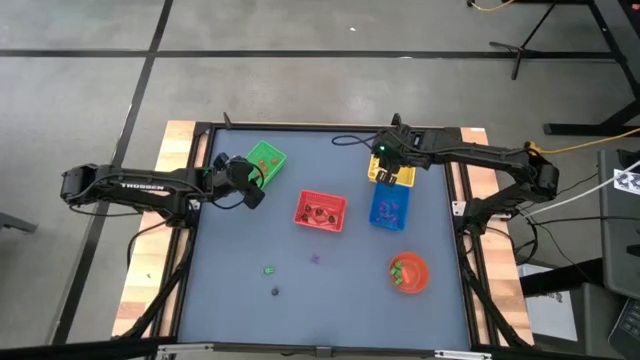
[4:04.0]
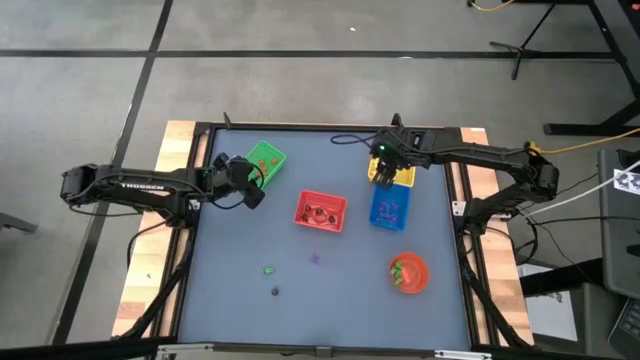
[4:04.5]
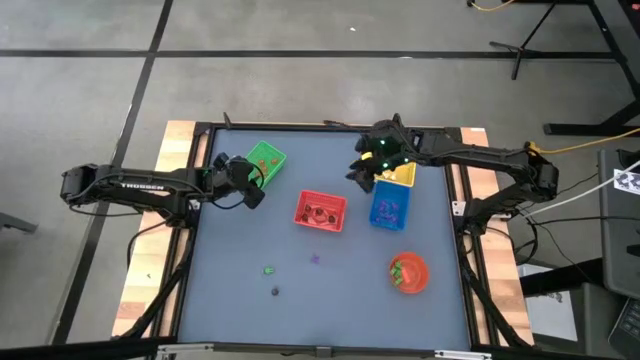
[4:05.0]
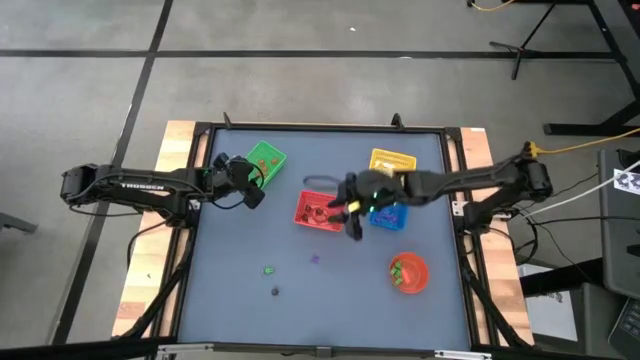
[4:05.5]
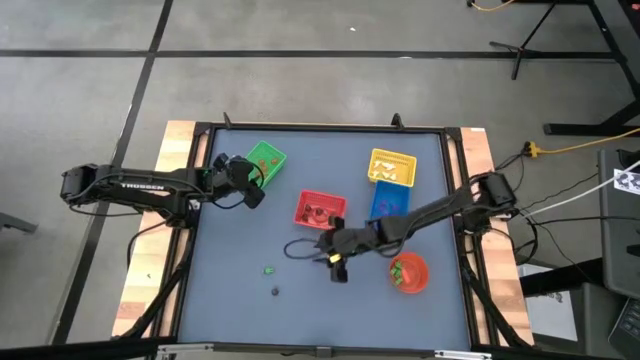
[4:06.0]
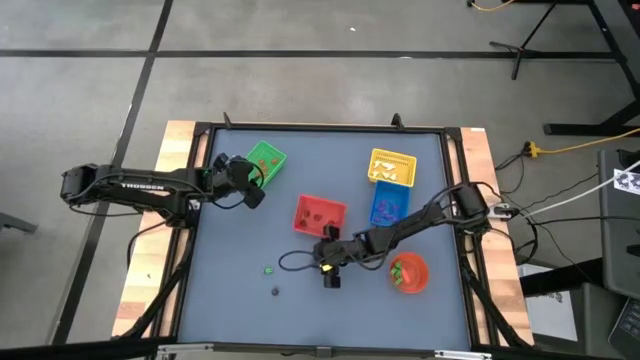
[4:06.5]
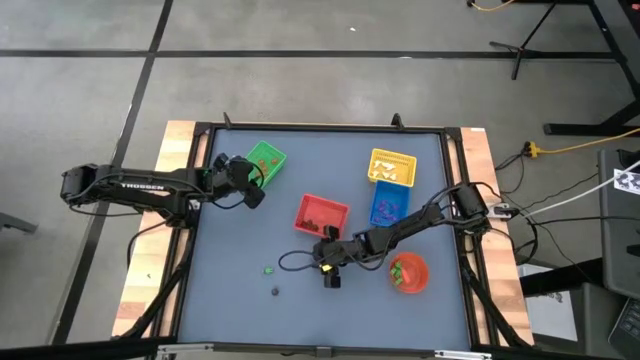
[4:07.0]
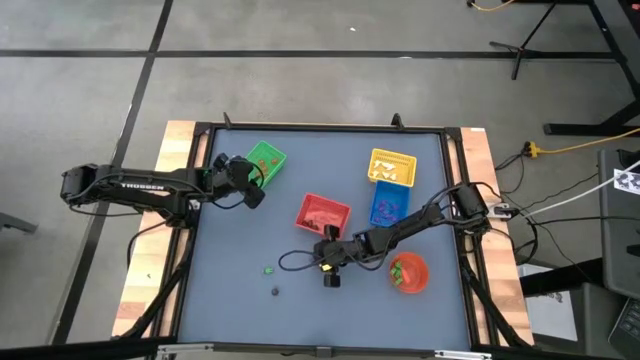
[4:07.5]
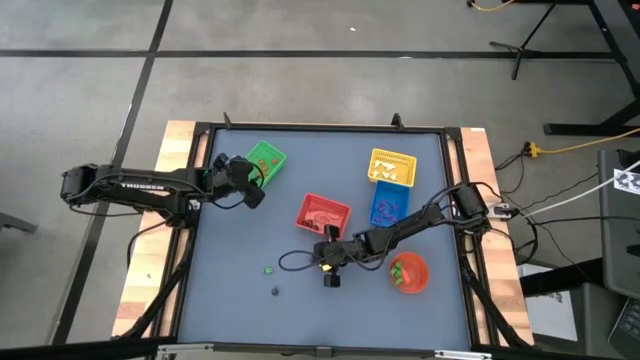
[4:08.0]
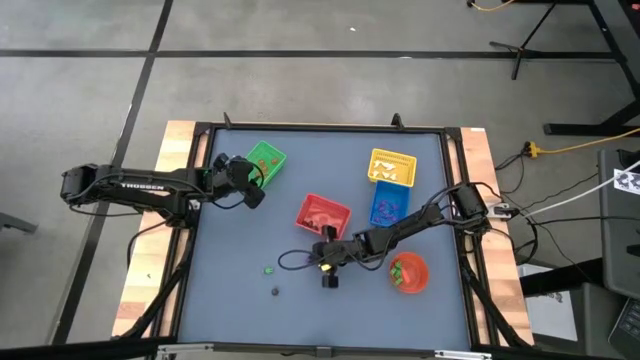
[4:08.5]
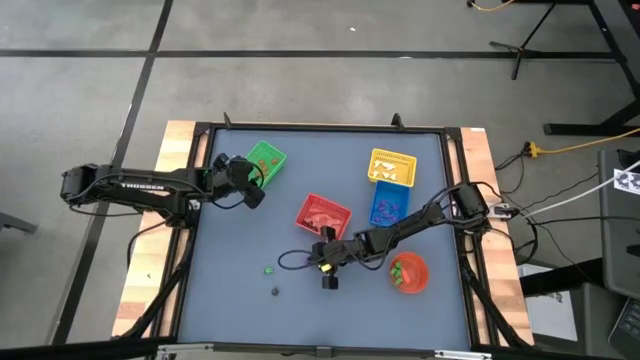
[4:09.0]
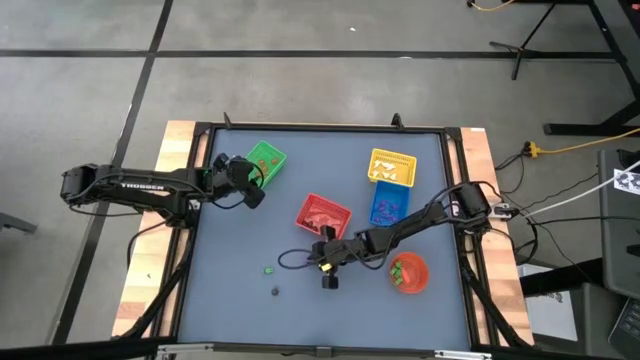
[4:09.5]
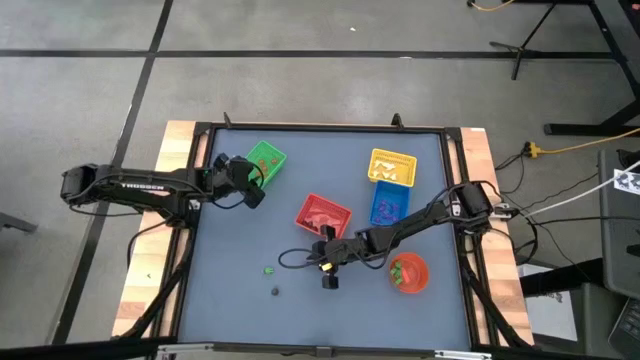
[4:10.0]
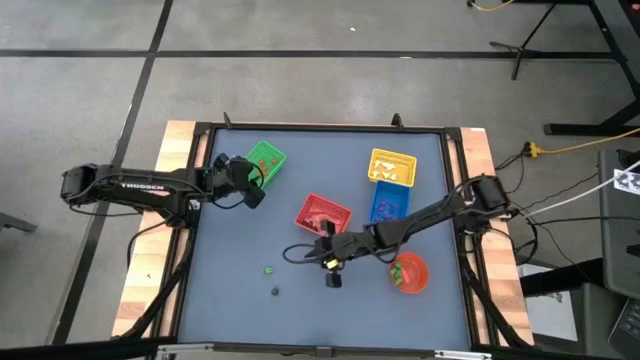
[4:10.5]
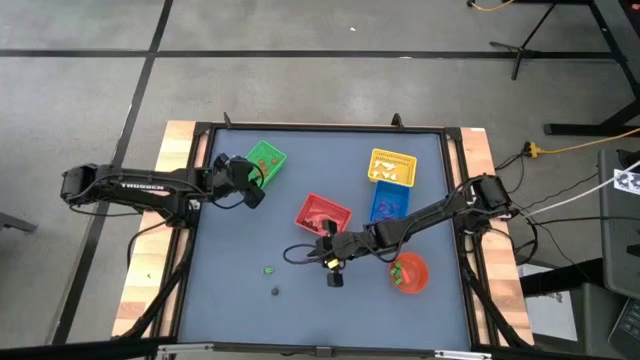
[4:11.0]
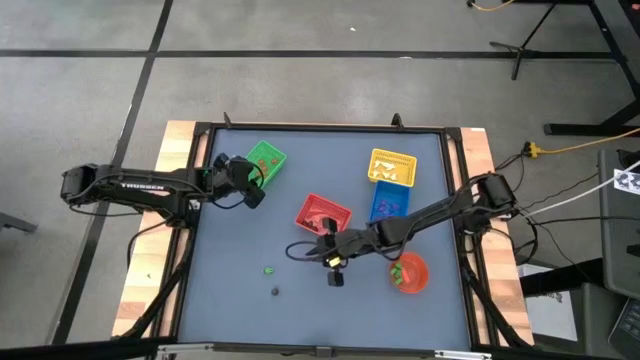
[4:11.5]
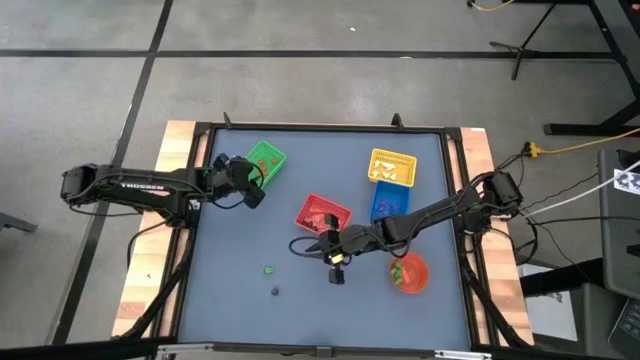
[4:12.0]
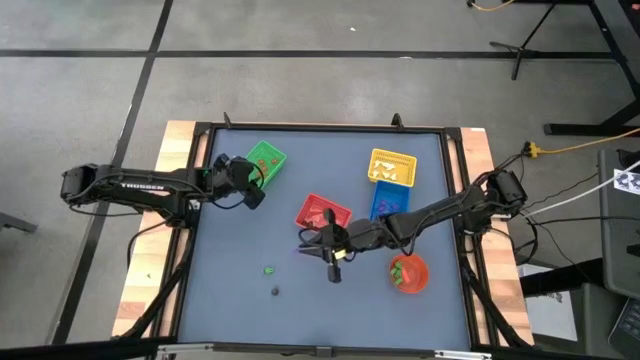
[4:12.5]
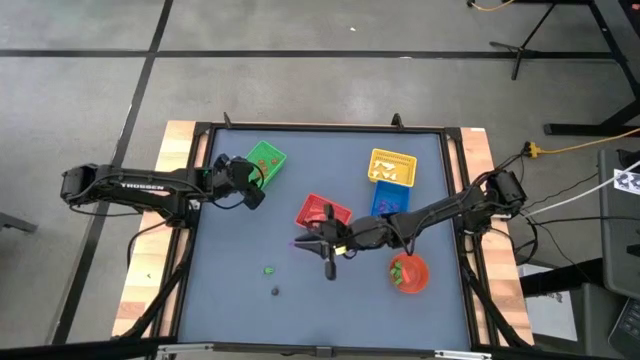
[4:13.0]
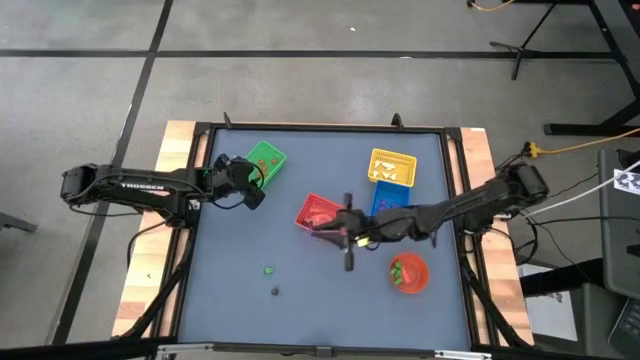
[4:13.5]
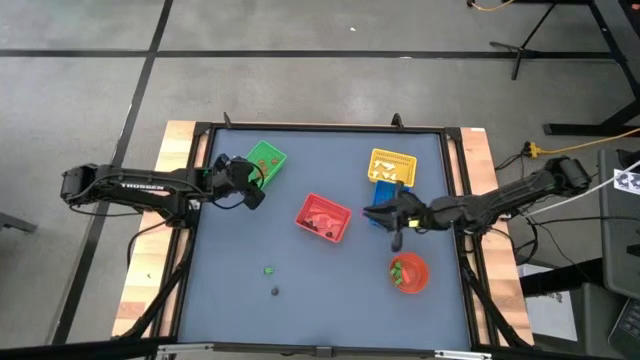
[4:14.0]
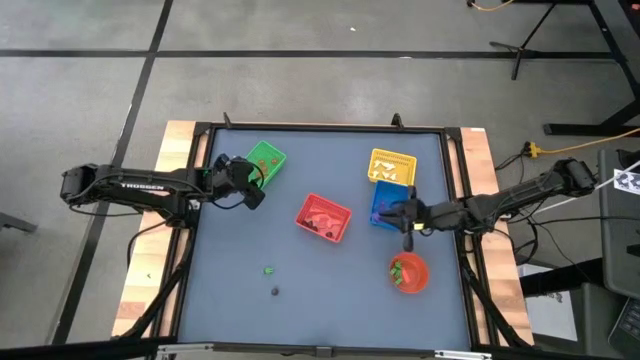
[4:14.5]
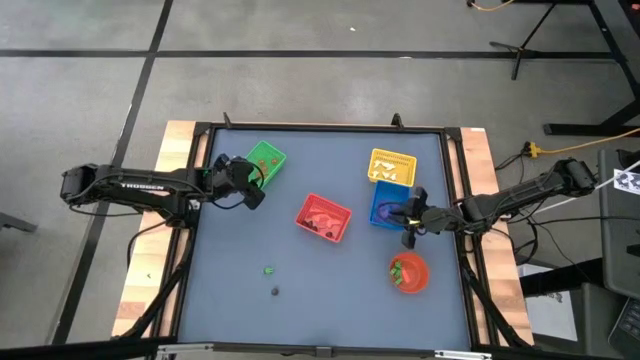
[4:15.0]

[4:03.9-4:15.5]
Task: Sort Halloween decoration
Put the violet spider toy into the blue bin

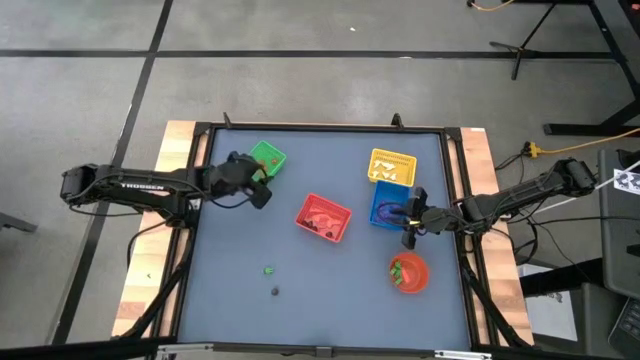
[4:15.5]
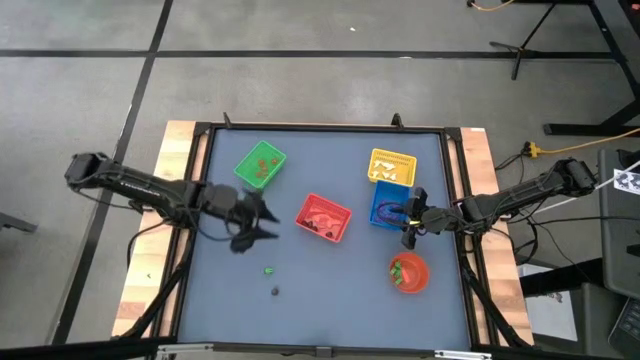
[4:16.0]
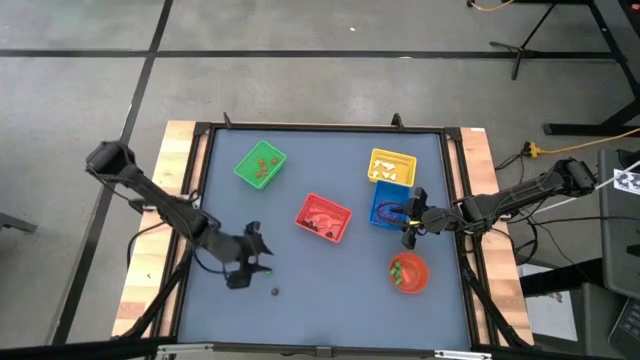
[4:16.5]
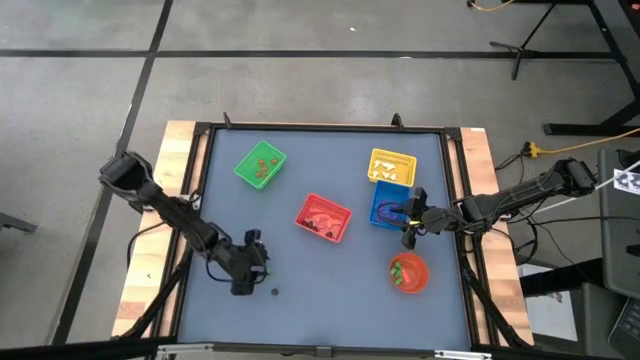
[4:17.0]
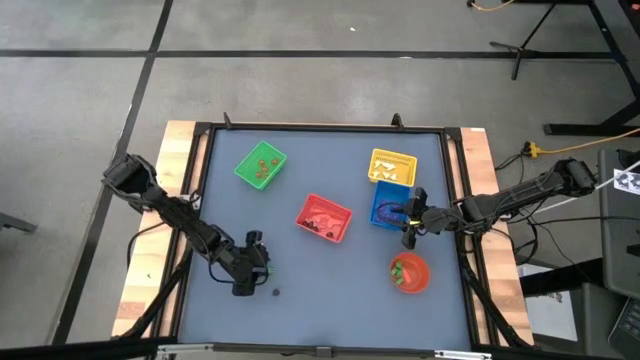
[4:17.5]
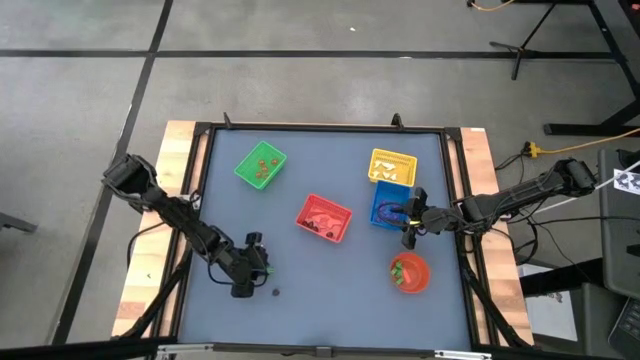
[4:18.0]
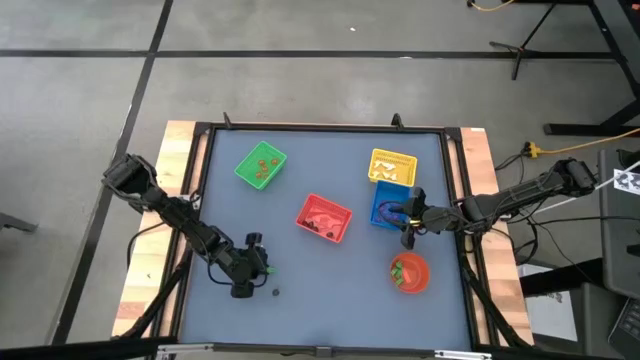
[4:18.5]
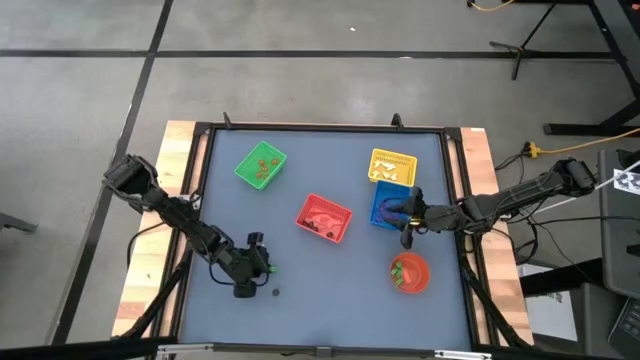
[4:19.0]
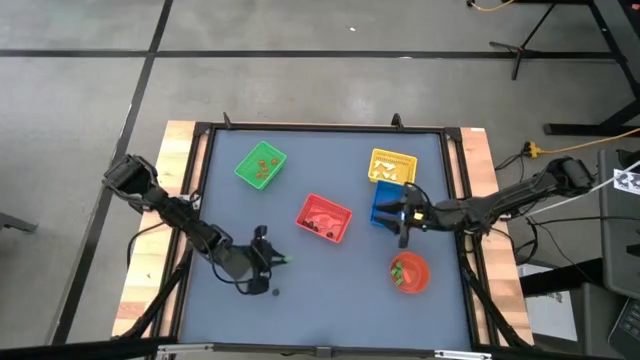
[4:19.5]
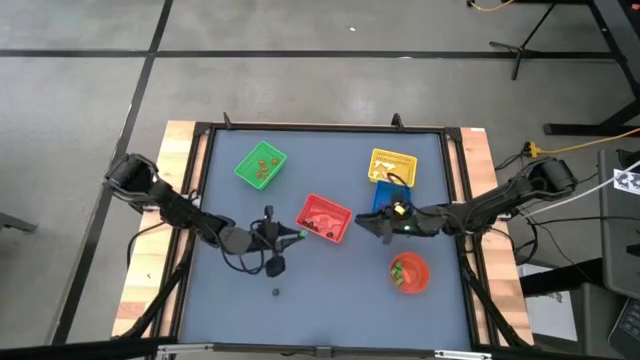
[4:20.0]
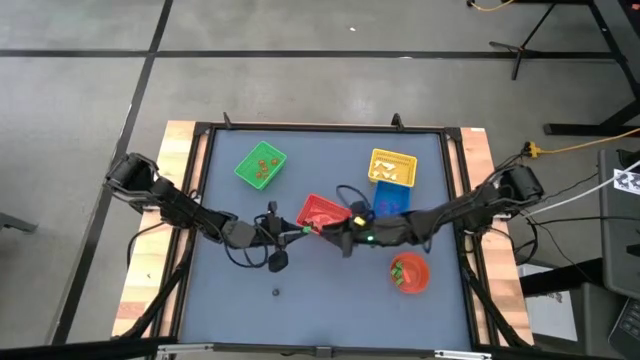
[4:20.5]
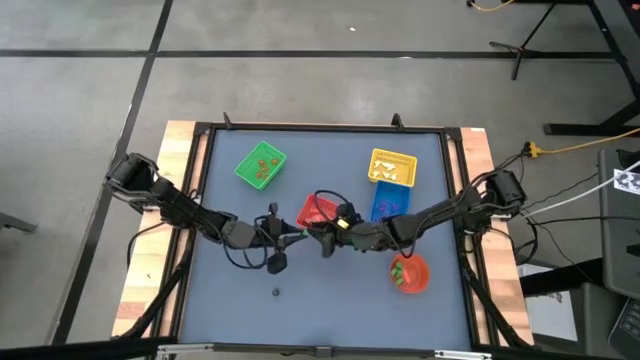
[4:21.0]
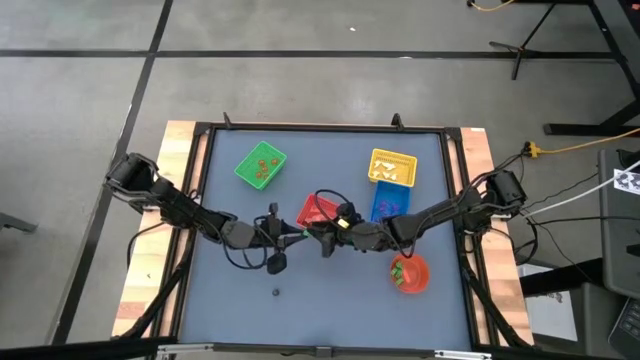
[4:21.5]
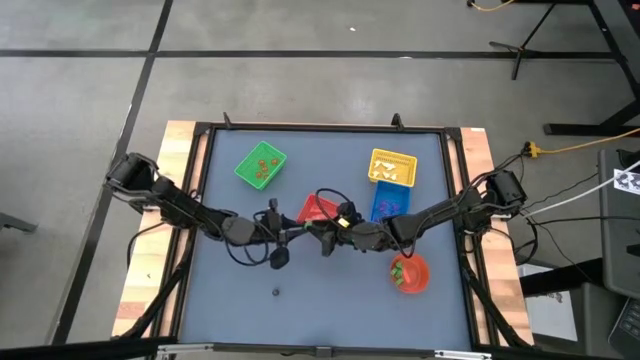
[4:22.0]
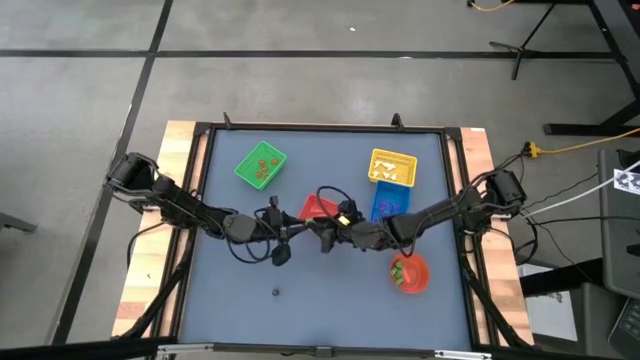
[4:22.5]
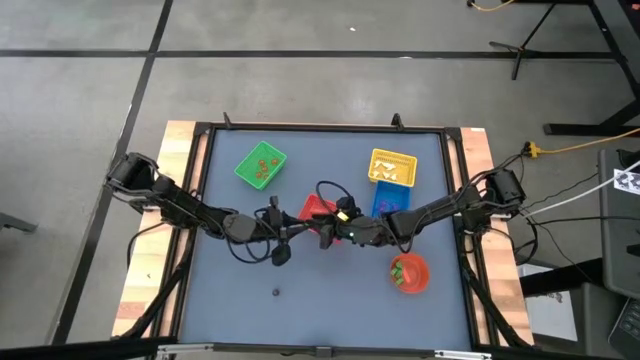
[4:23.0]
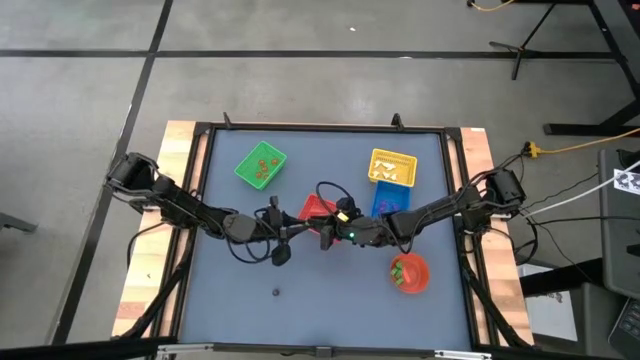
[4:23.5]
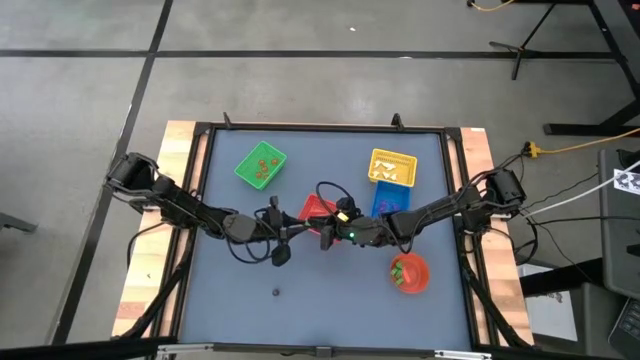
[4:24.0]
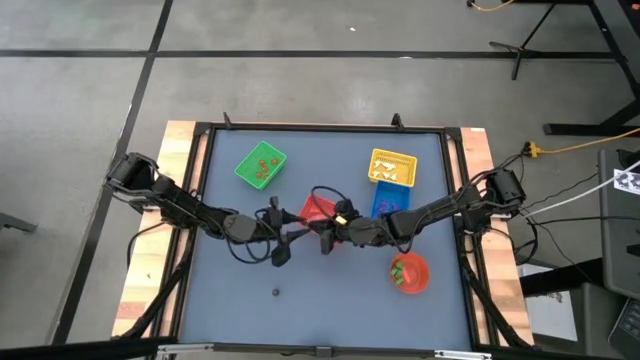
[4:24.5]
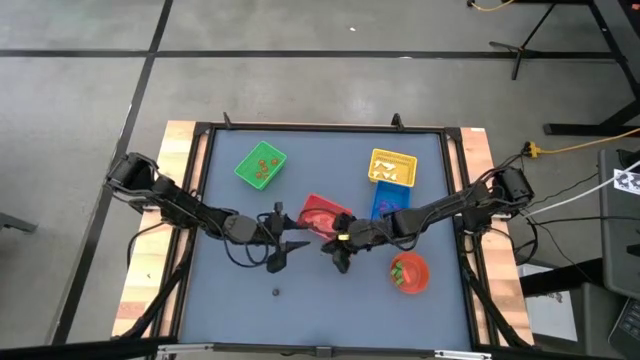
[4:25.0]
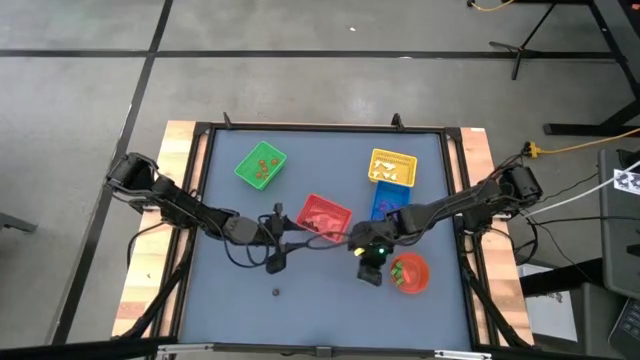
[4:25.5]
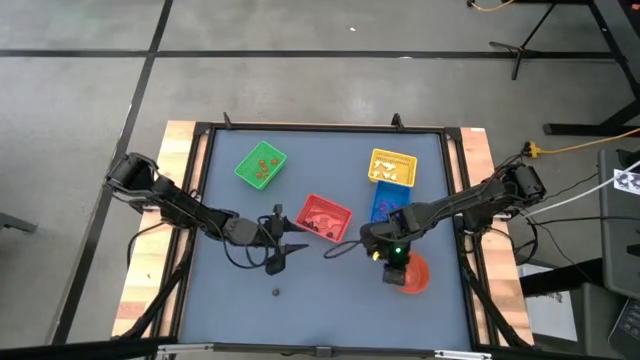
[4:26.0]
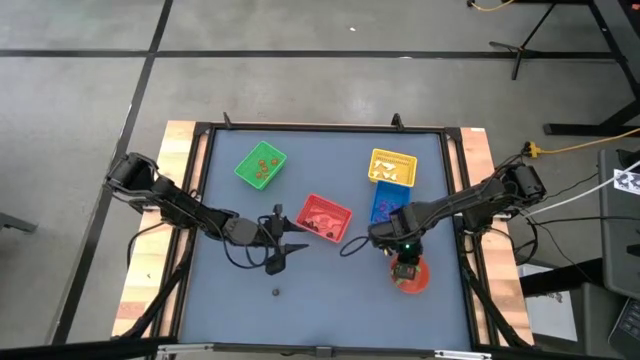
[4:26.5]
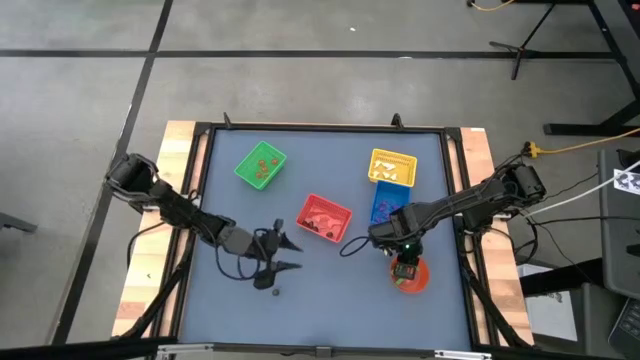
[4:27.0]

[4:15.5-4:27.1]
Put the green skeleton toy into the orange bin
